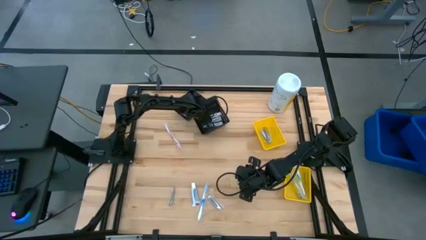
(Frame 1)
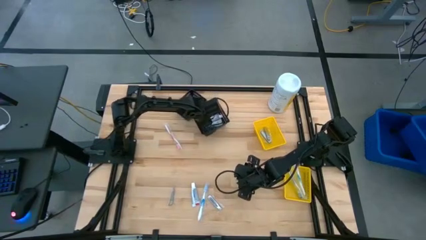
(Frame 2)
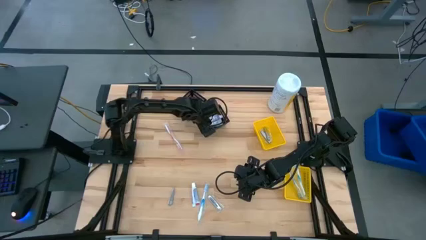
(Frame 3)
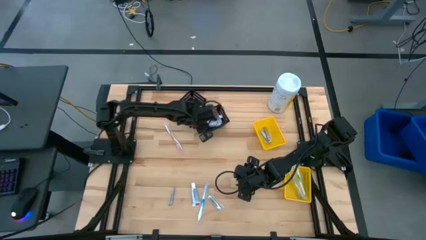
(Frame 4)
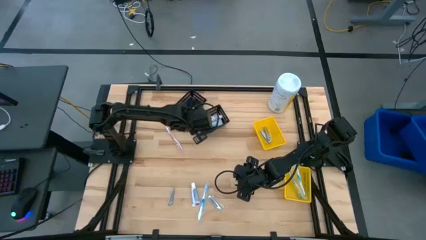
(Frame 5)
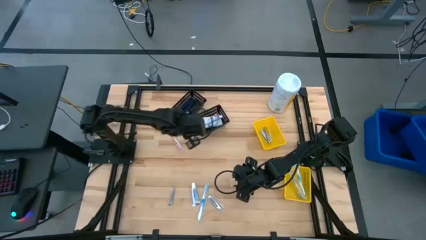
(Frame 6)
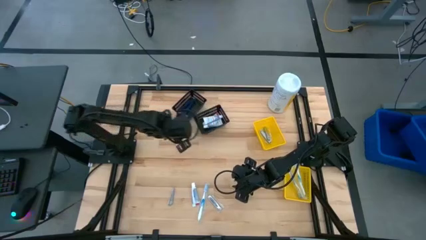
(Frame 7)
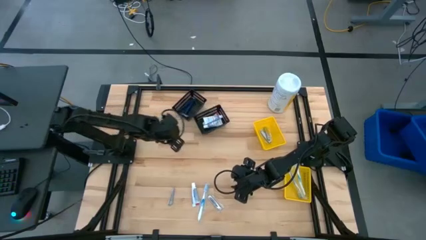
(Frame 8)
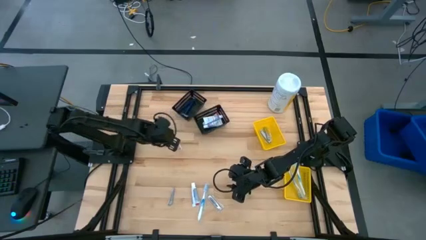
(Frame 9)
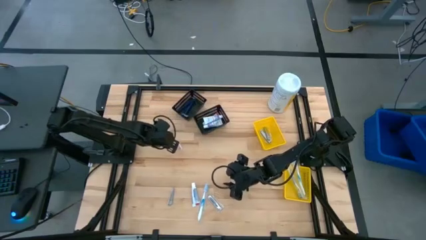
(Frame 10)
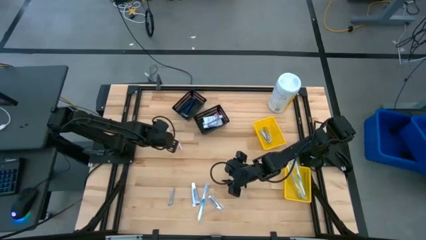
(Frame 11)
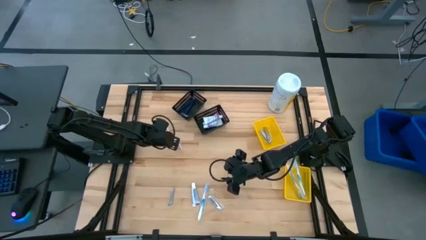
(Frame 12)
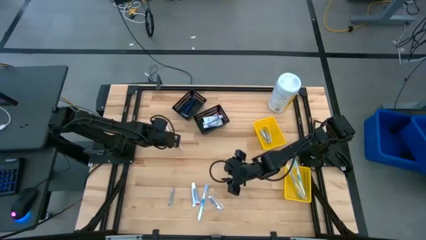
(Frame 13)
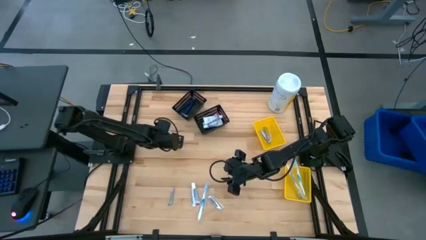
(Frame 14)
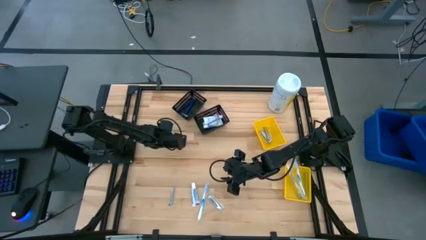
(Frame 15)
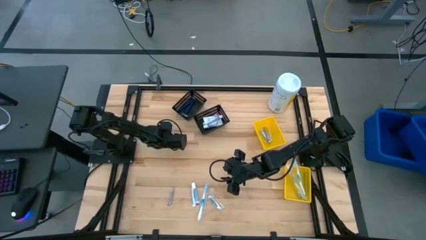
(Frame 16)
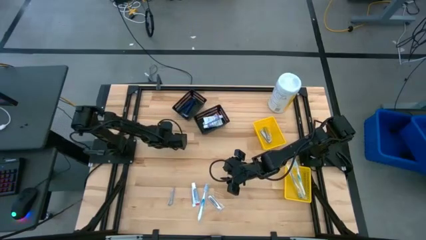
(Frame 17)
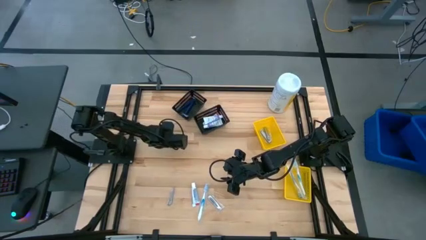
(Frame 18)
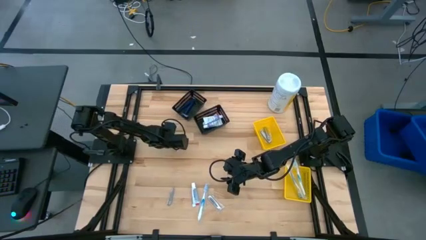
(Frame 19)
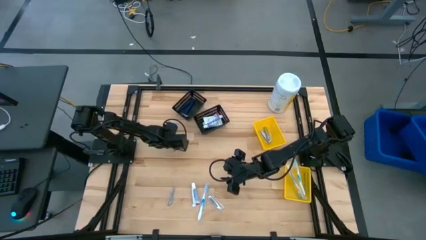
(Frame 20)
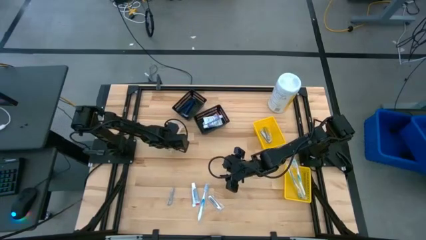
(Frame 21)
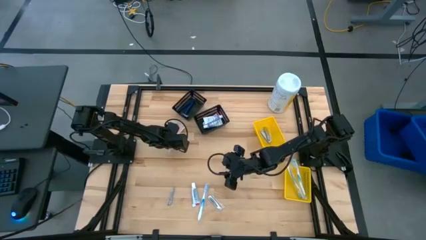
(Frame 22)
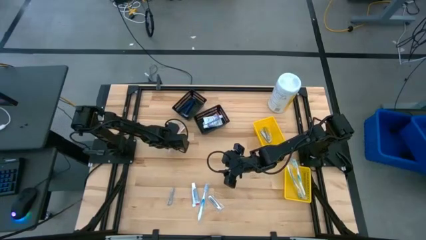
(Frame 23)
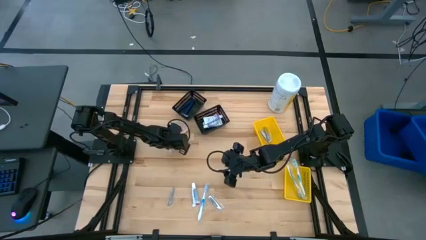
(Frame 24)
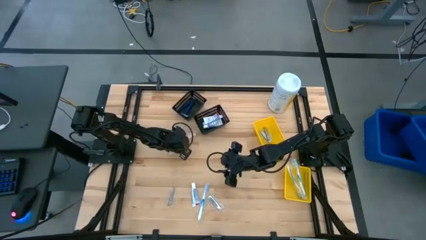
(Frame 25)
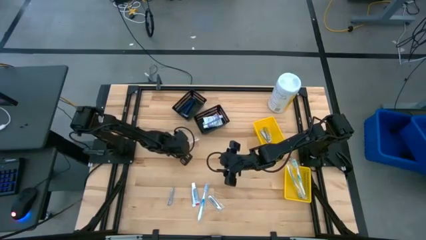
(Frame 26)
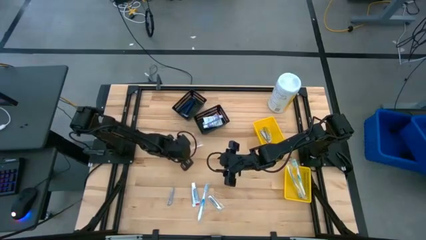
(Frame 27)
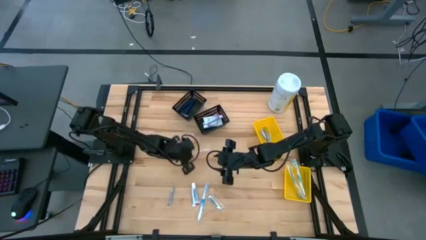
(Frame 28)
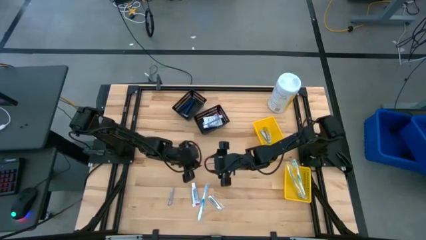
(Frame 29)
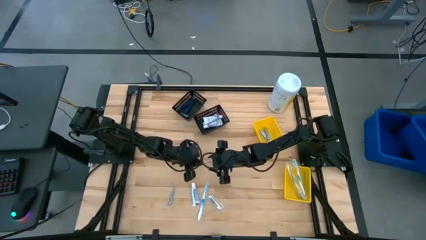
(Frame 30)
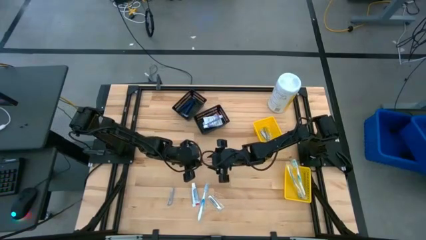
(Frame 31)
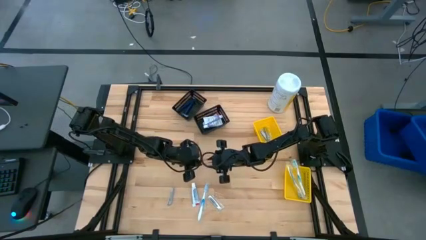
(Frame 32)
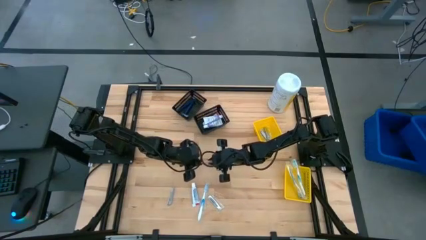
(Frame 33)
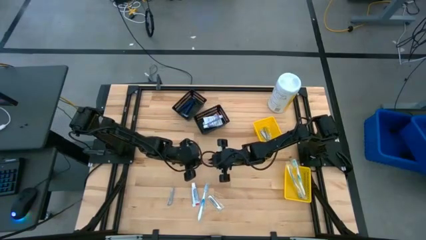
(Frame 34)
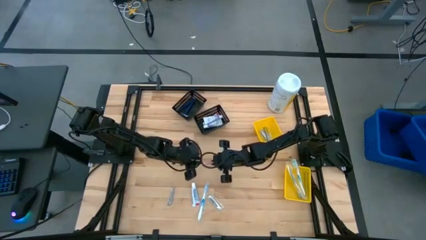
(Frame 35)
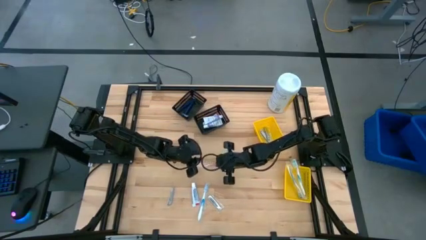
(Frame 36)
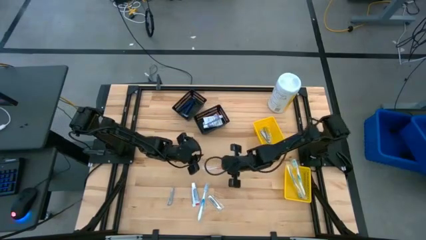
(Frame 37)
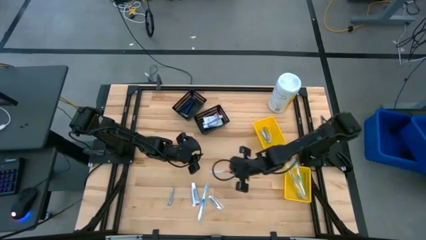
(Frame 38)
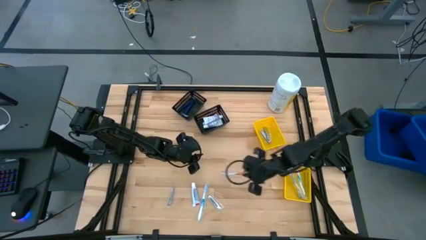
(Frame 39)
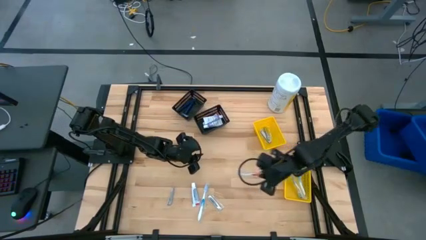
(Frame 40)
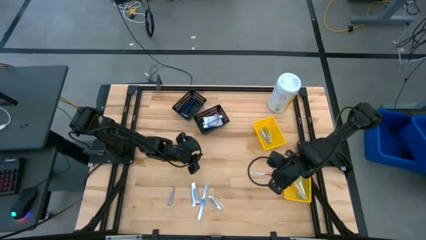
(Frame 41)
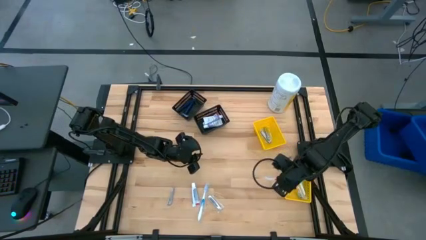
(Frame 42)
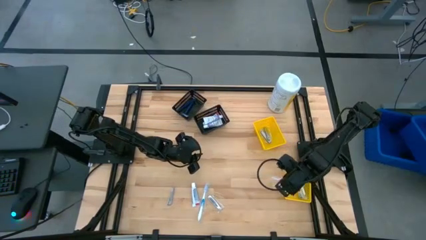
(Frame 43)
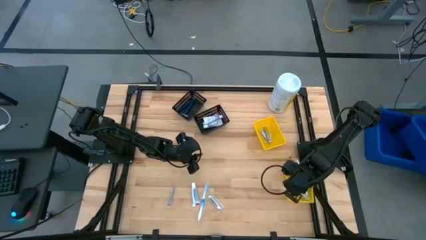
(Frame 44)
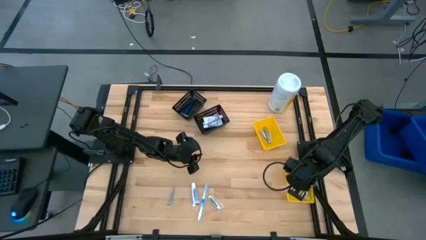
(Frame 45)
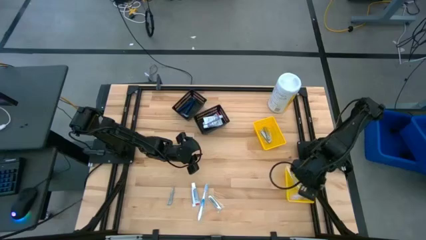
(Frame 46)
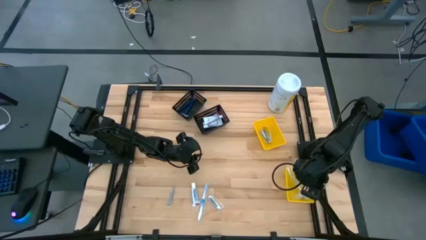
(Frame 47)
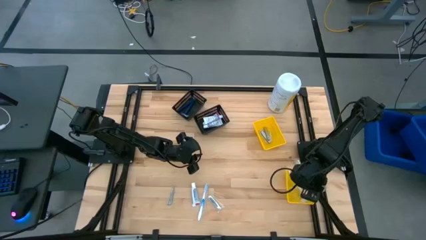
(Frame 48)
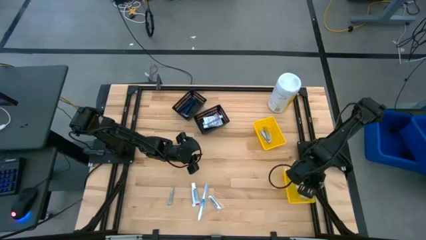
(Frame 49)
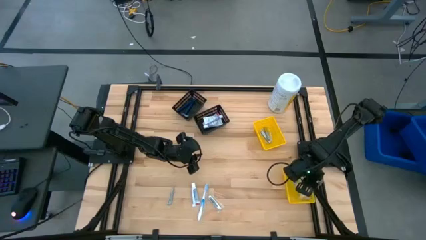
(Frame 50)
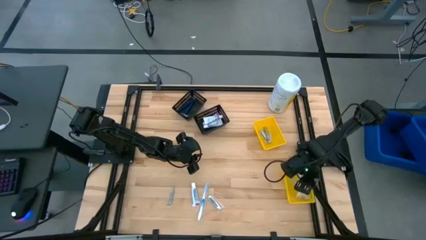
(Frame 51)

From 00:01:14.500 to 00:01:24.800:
Task: Pick & Place Travel size toiletries
Put the orange toothbrush into the bottom yellow bin

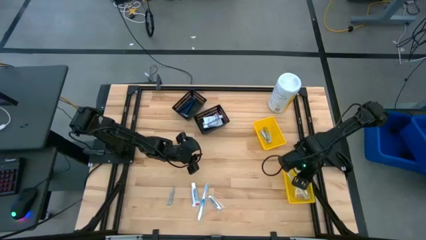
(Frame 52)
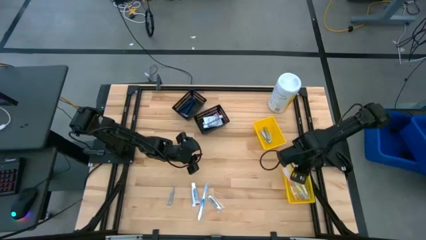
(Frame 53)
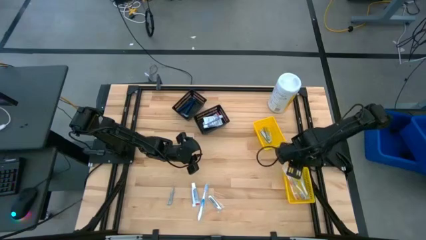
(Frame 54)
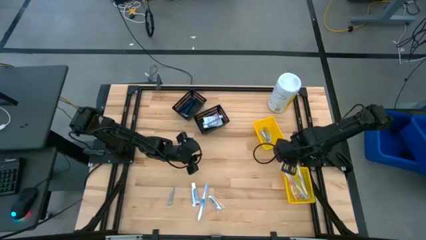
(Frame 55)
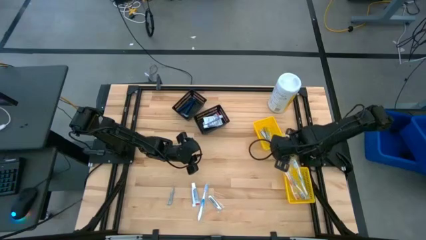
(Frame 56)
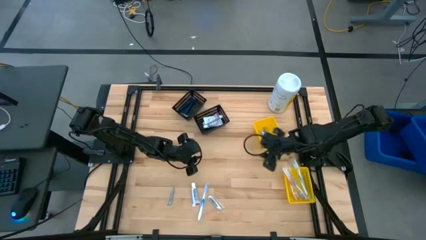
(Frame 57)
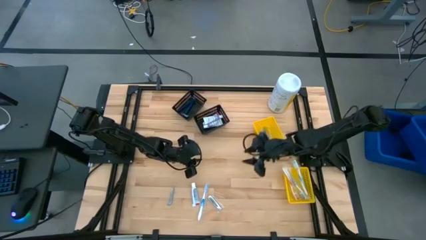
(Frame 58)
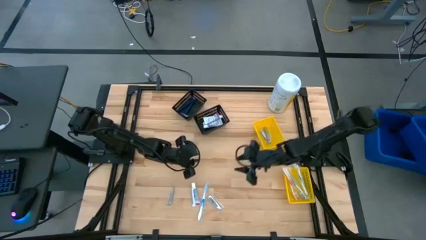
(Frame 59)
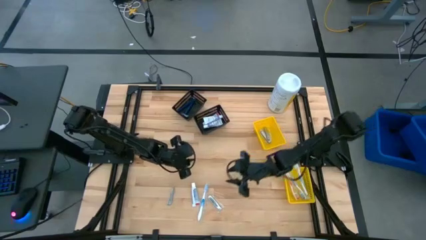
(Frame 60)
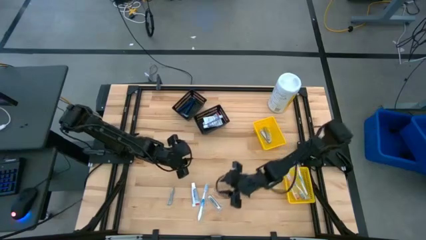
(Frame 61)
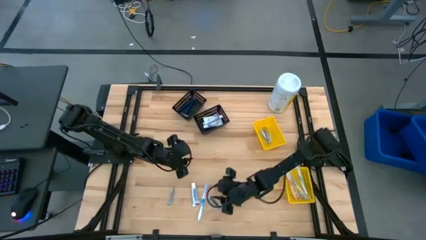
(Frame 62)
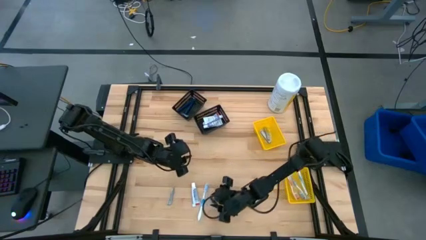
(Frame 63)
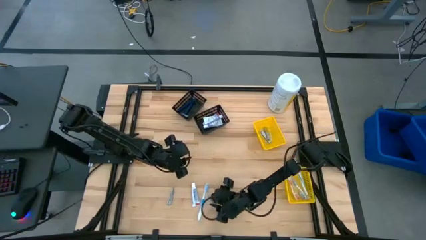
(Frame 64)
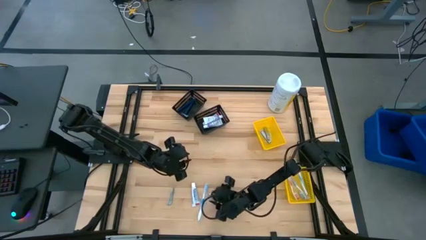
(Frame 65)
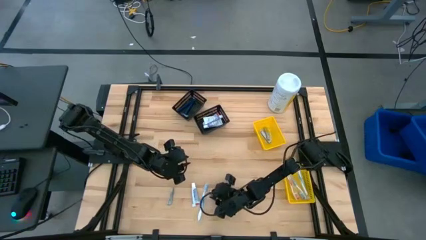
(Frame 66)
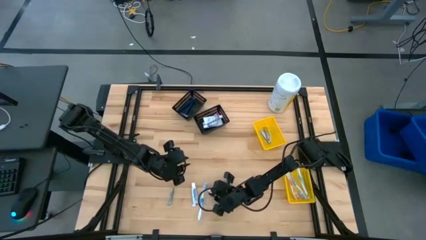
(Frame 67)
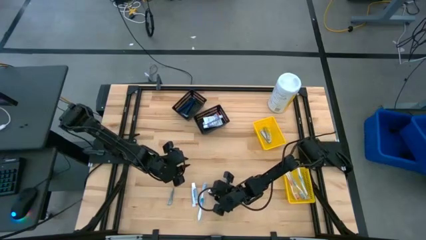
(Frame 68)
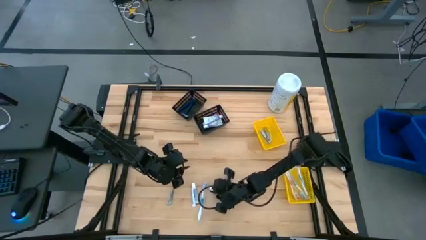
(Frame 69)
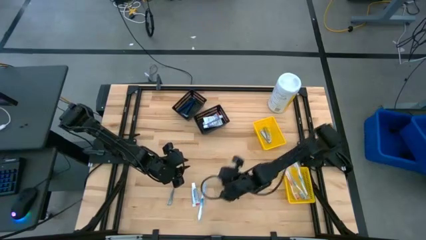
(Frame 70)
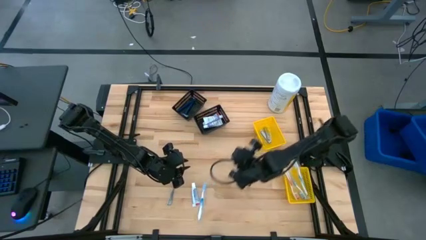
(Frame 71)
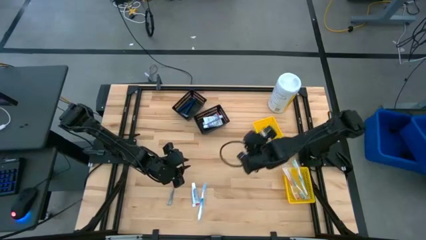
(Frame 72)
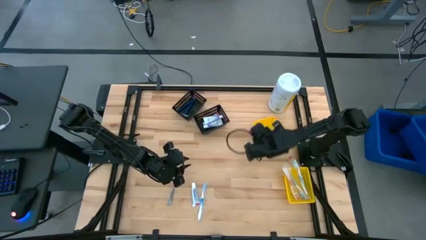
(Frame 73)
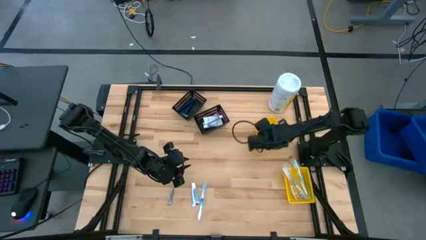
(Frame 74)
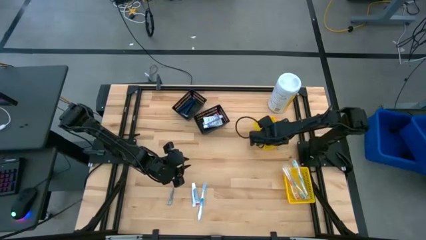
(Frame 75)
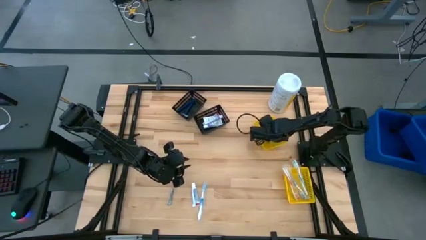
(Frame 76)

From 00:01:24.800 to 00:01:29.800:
Put the nail cutter into the top yellow bin
